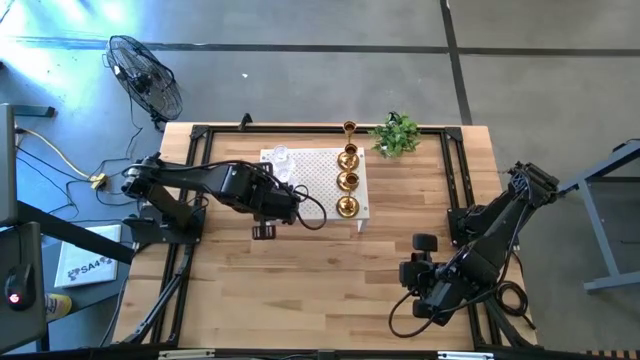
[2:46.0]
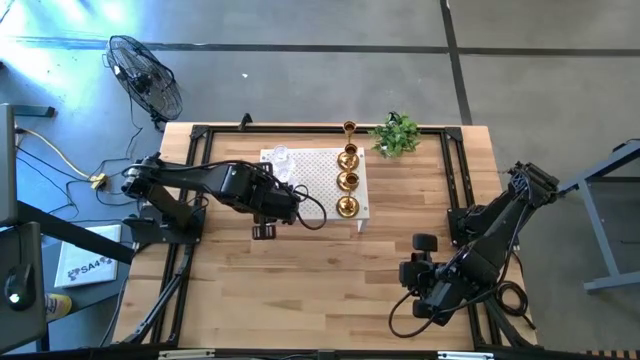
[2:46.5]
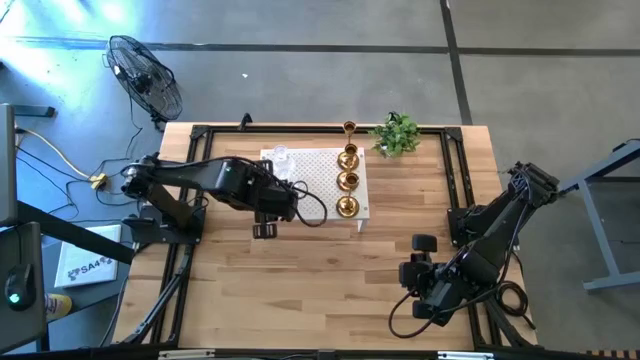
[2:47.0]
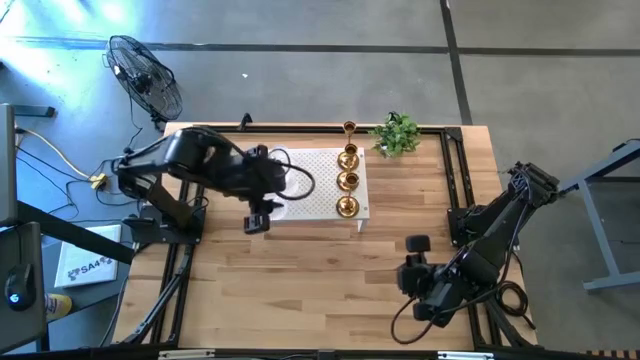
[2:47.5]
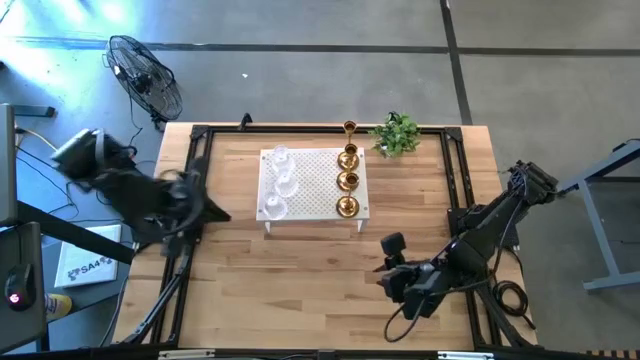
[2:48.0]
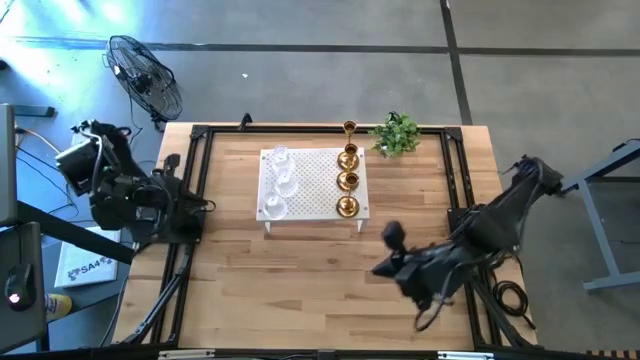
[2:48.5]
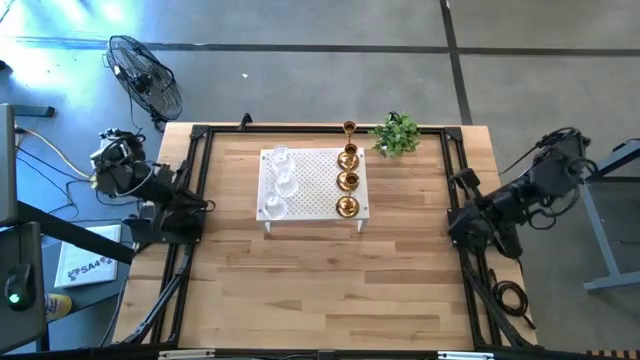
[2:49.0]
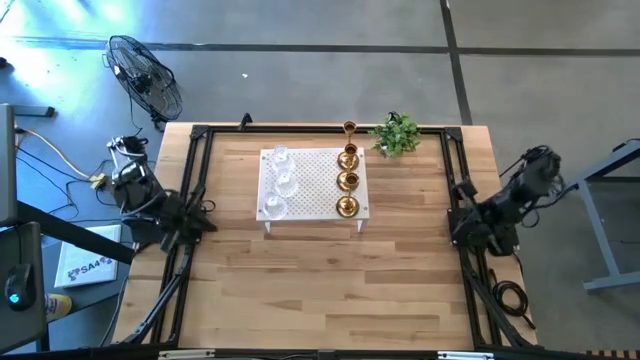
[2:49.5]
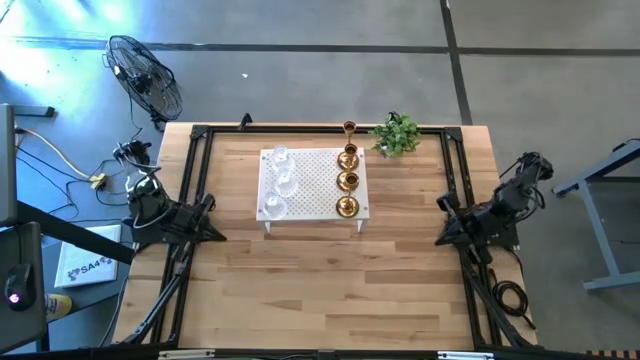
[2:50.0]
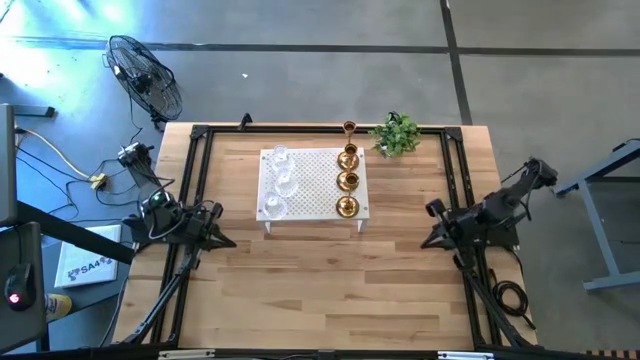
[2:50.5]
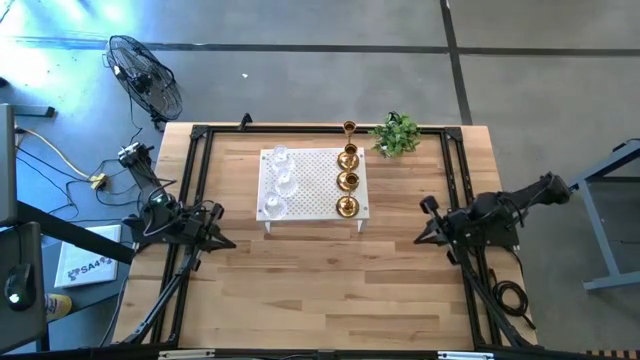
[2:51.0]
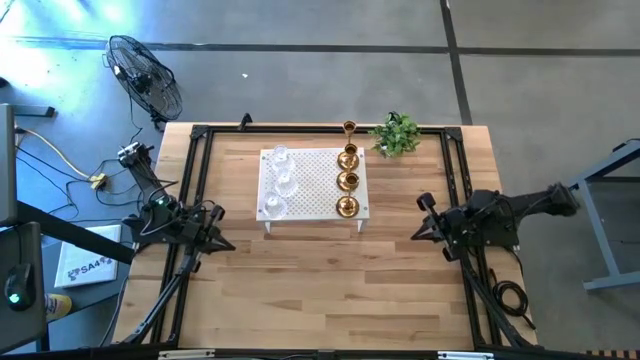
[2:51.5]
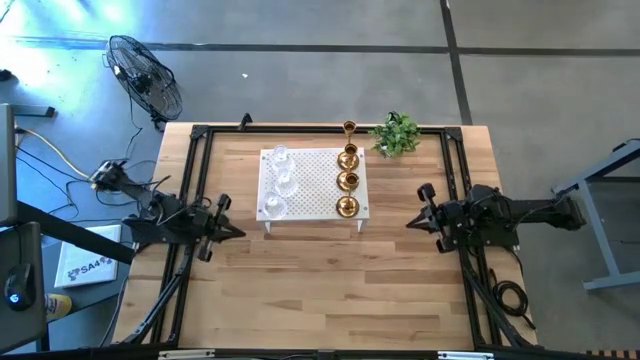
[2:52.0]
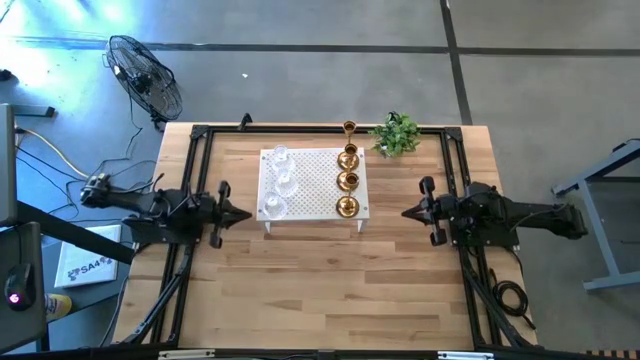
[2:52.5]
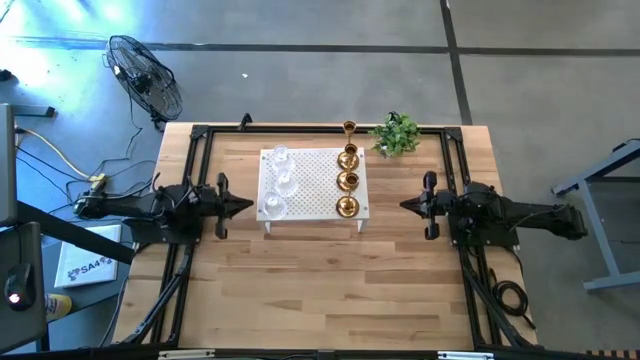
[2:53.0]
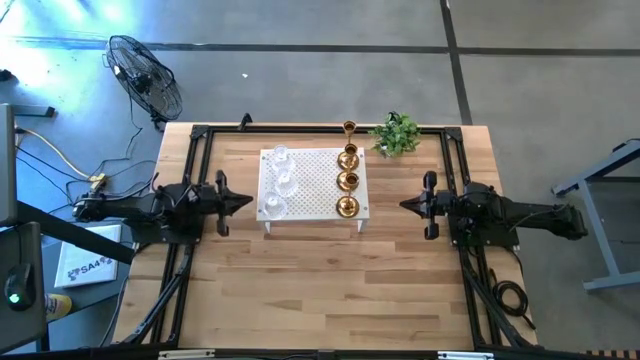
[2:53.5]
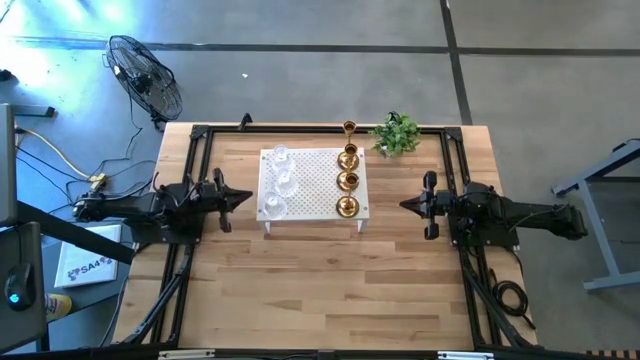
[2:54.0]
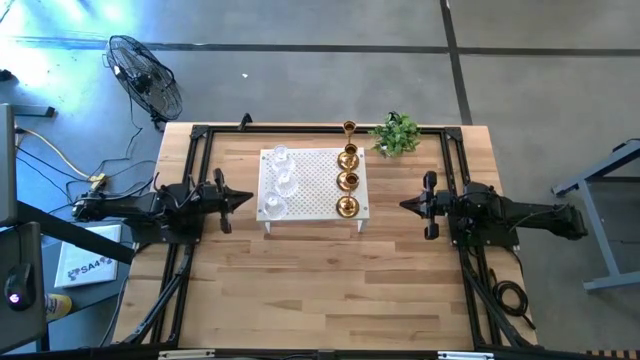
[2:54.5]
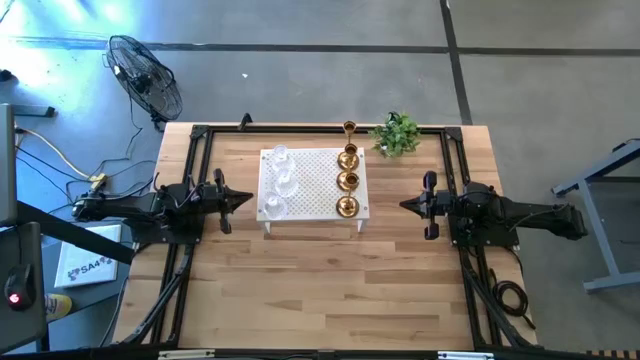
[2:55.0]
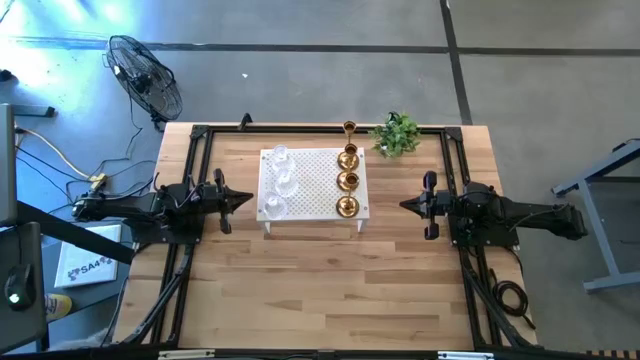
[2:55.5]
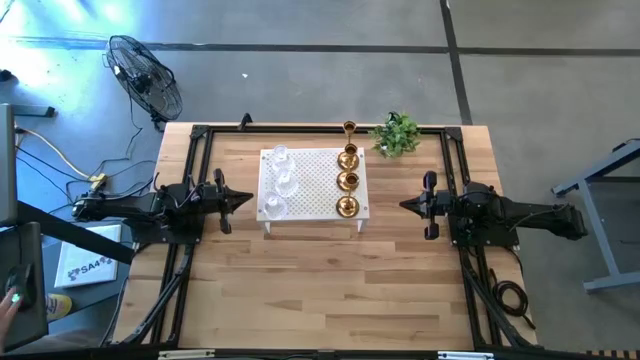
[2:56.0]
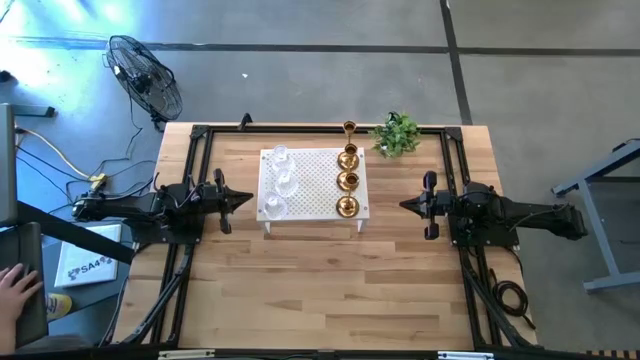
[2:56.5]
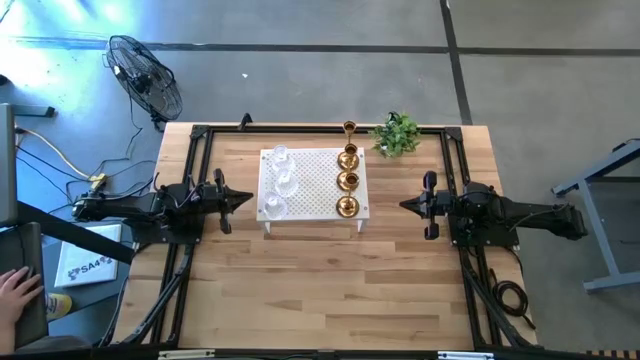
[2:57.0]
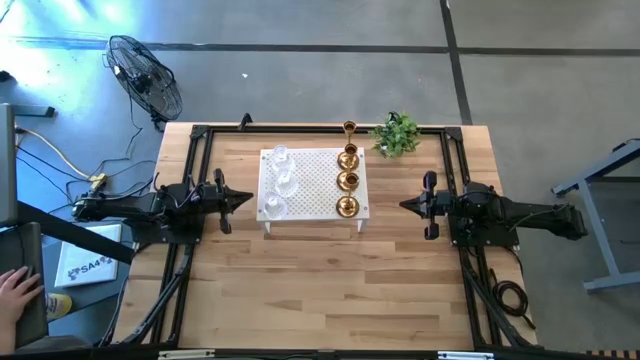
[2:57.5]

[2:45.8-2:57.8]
Task: Pick & Place candle stick holders
Return to Home Position

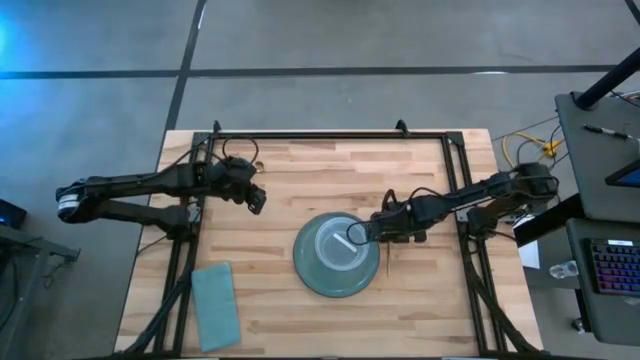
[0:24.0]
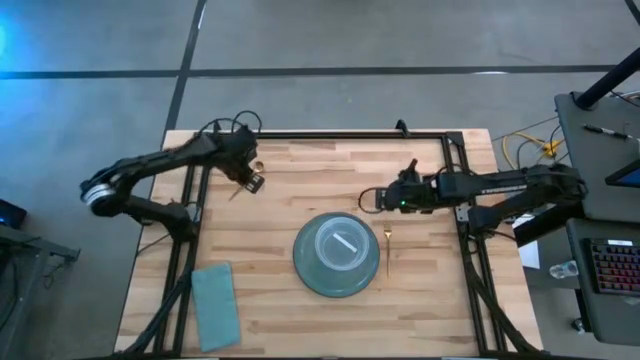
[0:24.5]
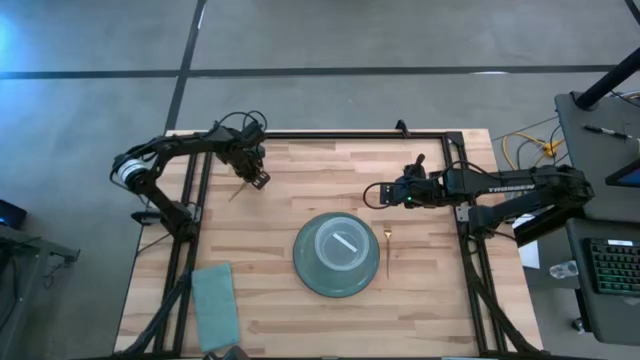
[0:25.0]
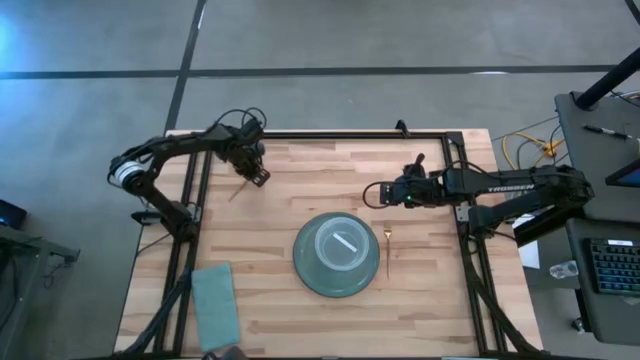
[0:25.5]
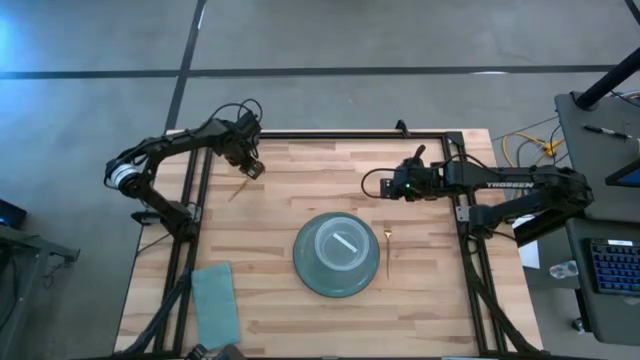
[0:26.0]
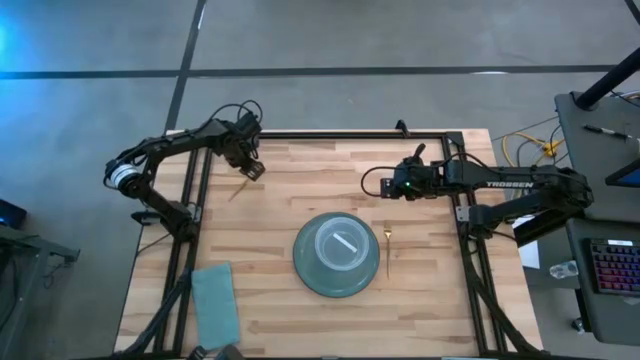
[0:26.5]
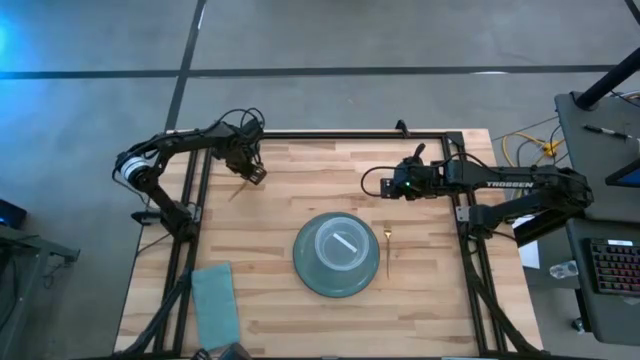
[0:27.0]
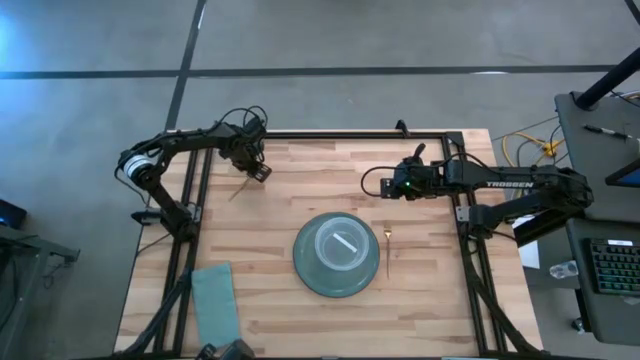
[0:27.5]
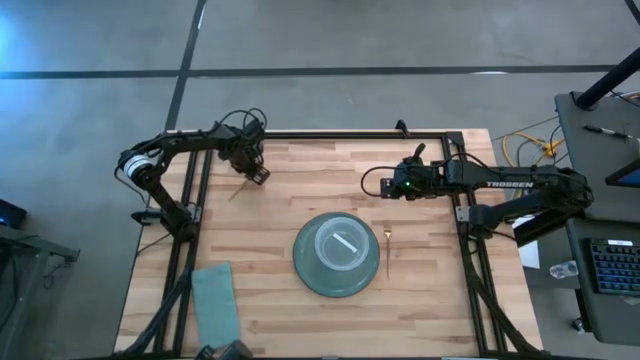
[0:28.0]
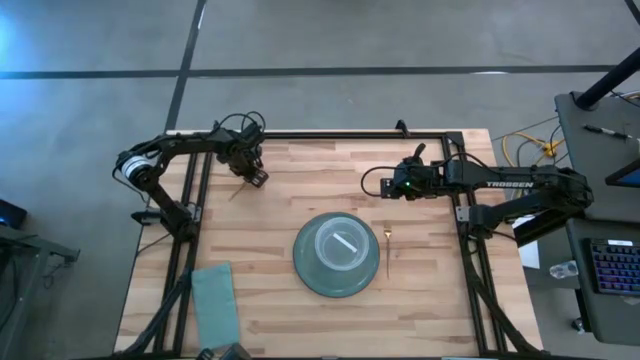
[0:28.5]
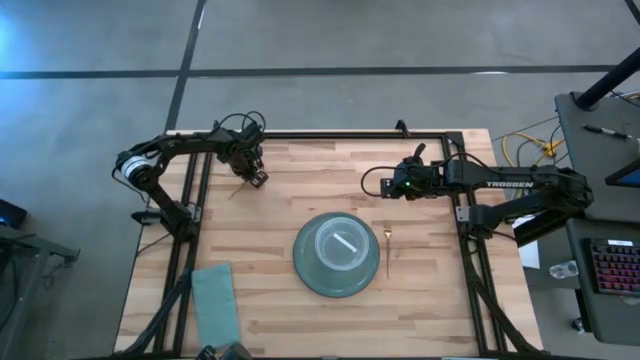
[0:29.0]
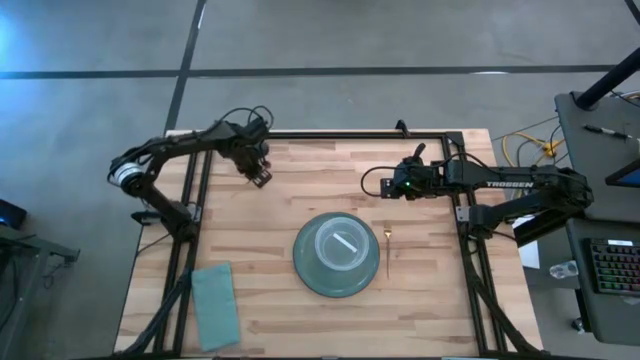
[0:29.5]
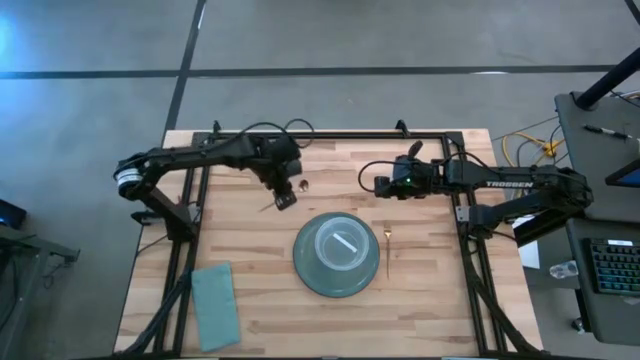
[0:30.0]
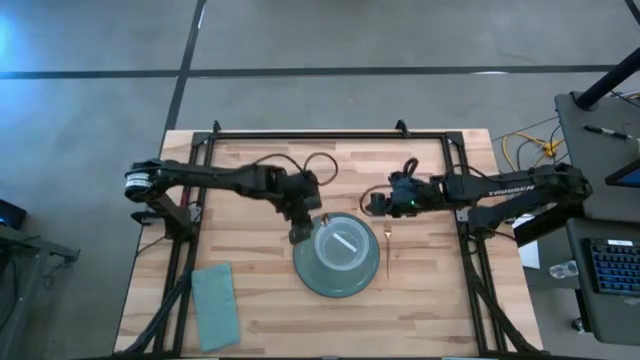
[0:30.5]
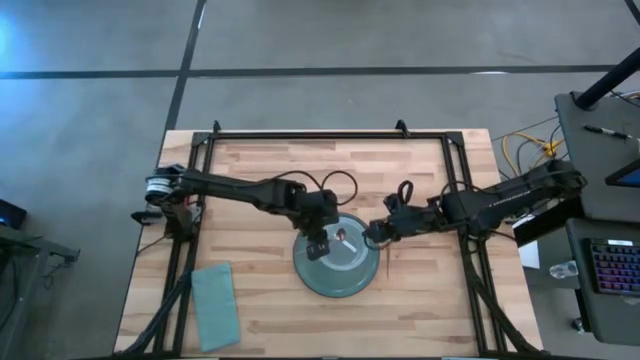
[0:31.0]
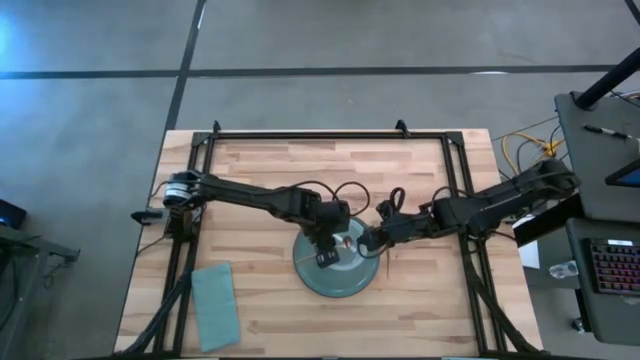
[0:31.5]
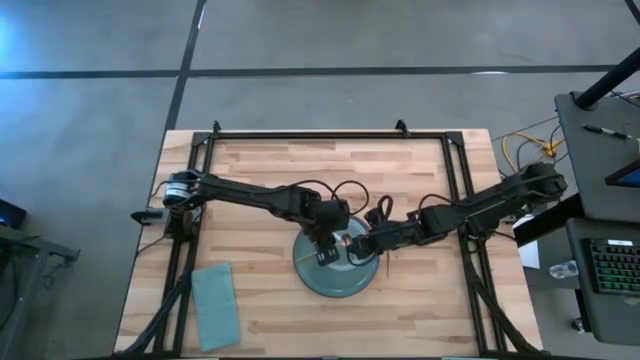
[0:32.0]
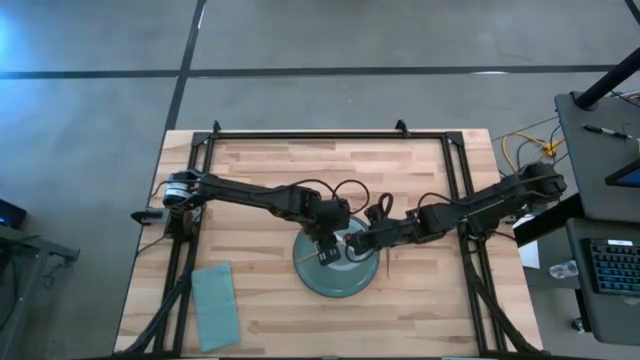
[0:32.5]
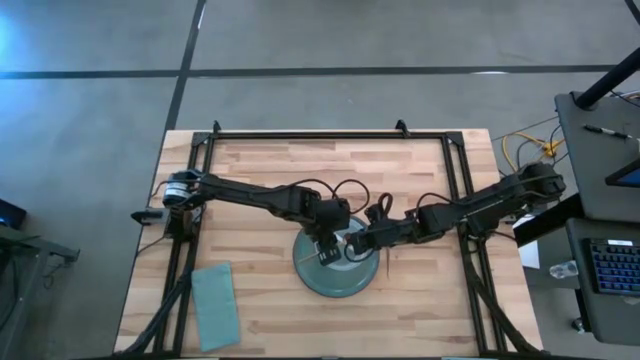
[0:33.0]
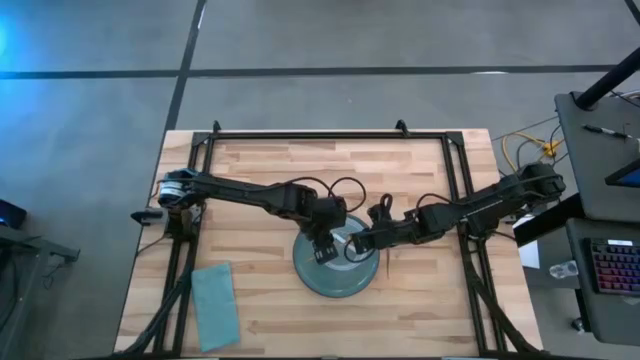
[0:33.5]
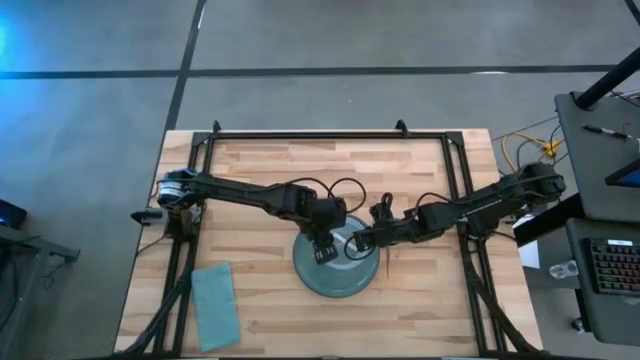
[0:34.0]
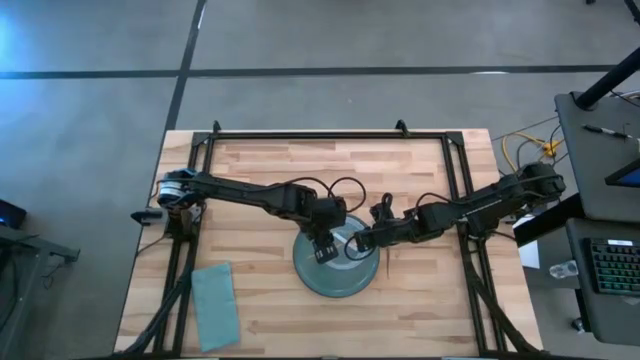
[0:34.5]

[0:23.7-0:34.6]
Task: Set table place
Put the spoon into the transparent bowl
